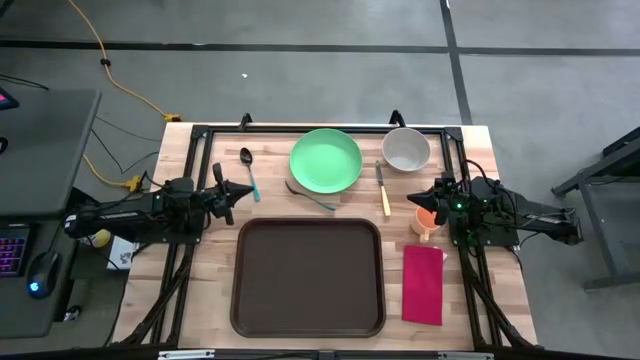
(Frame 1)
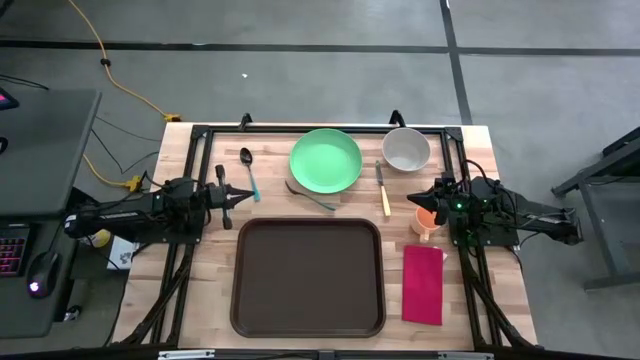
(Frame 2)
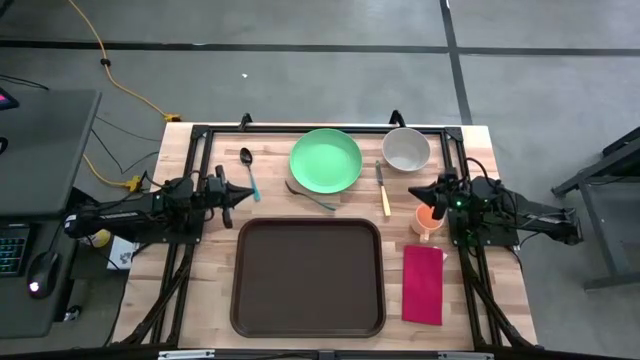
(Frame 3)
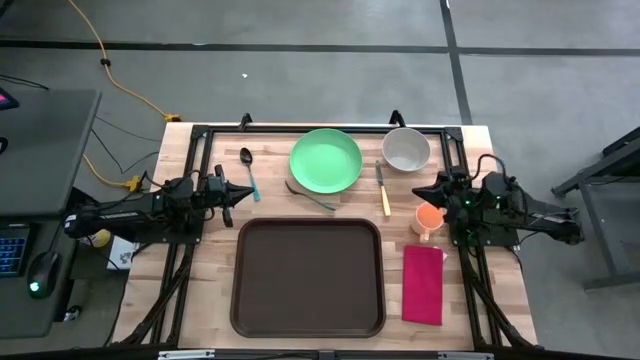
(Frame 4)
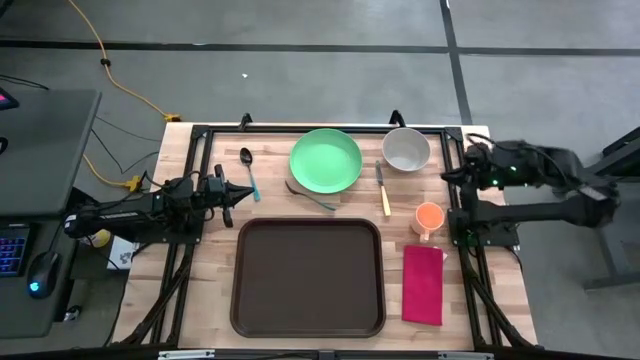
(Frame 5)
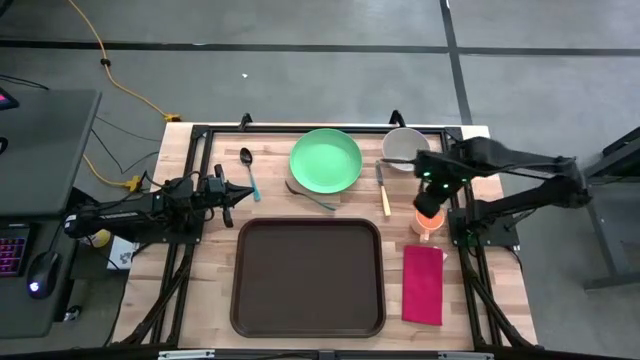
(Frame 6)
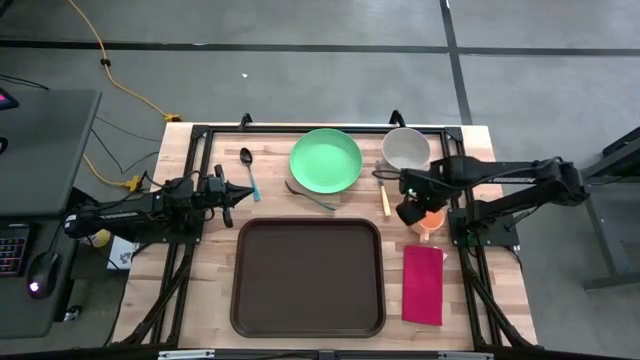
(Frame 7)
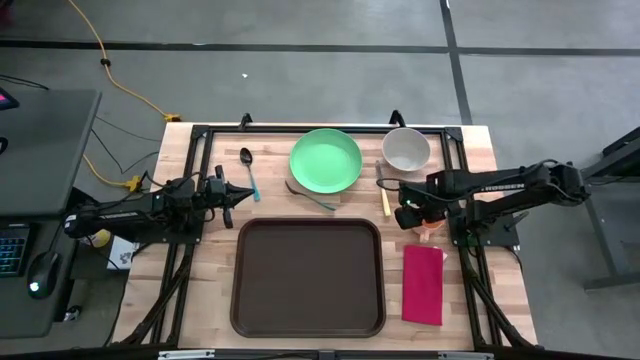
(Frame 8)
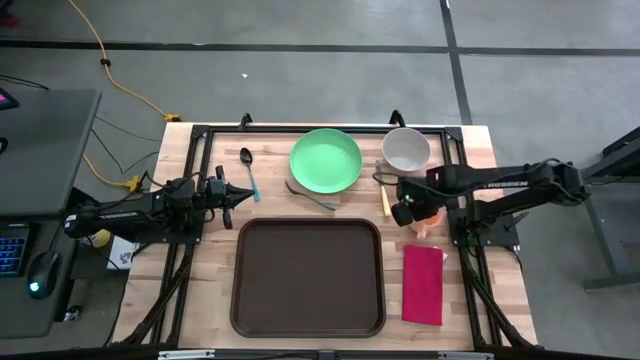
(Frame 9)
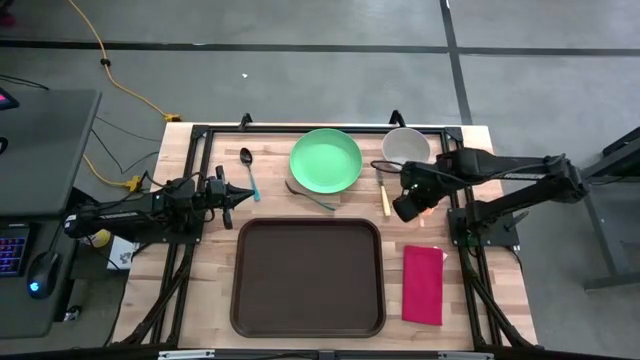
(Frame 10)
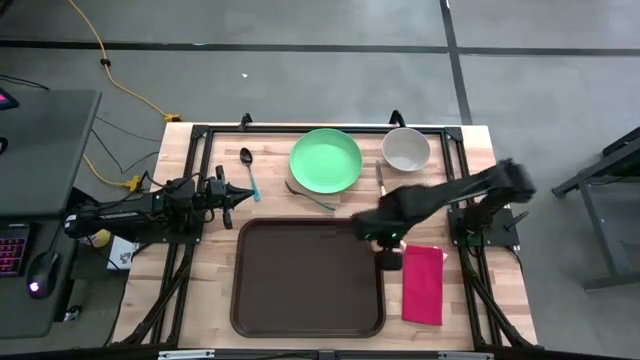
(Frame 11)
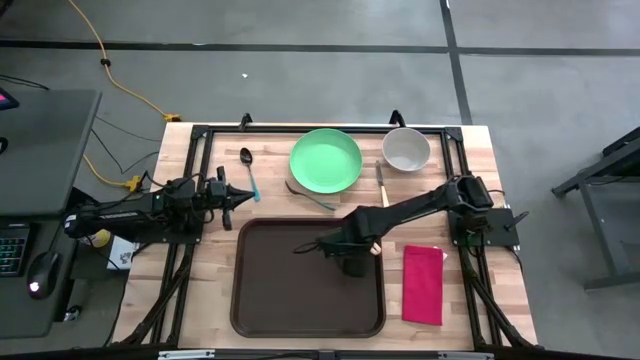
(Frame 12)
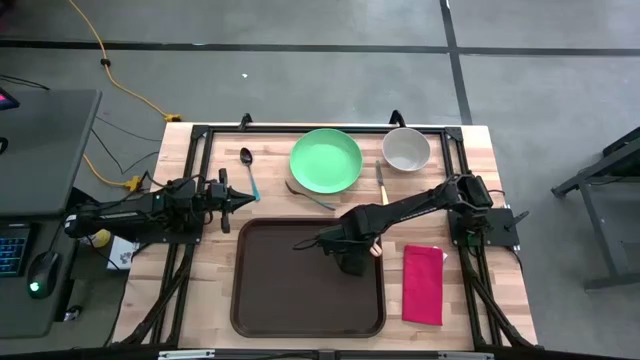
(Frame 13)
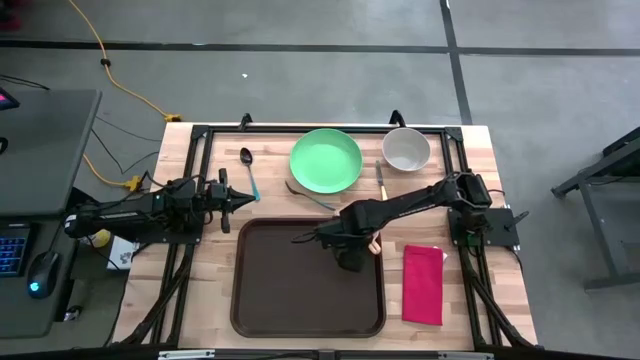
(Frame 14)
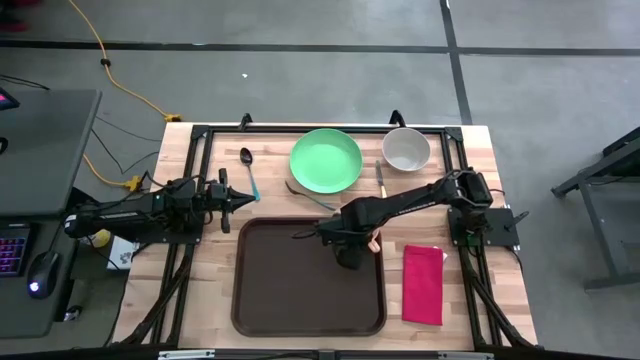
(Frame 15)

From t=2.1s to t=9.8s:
Task: Set up tray
Put the light orange mug on the black serving tray

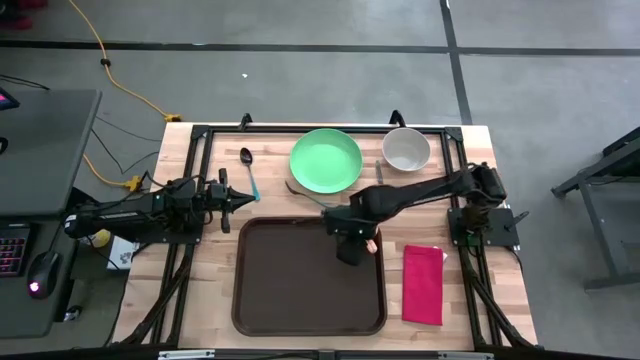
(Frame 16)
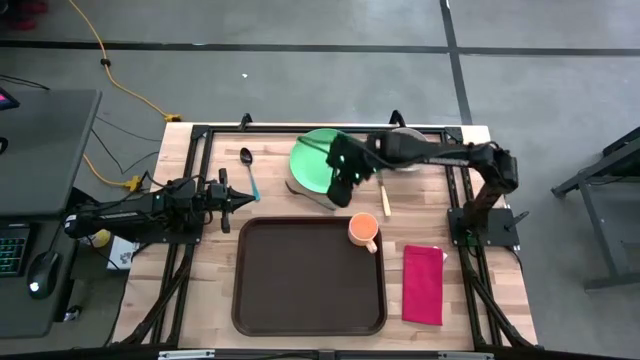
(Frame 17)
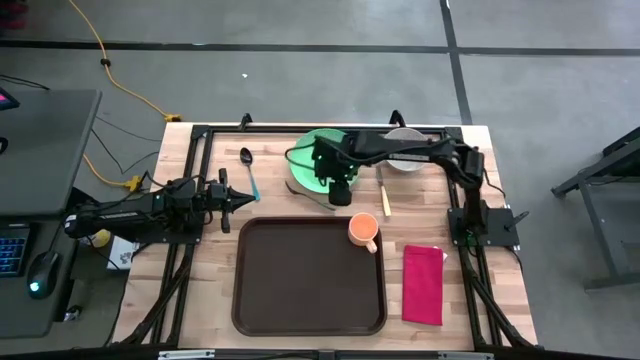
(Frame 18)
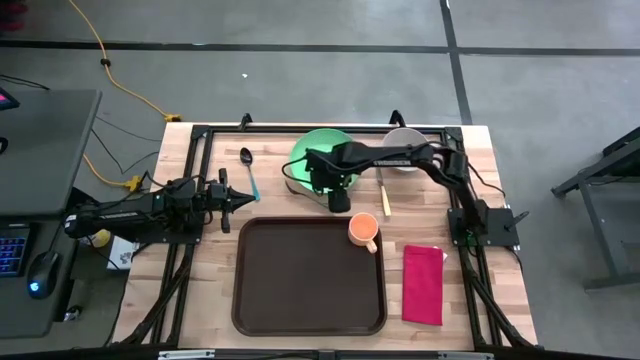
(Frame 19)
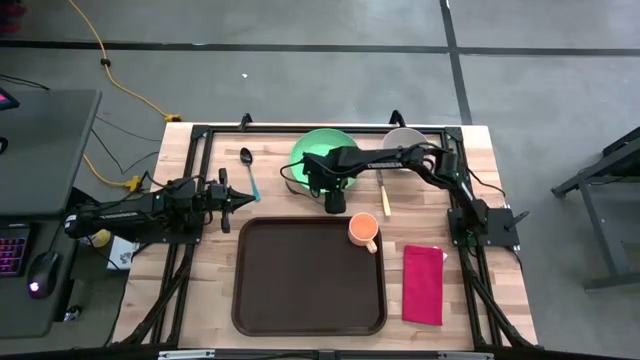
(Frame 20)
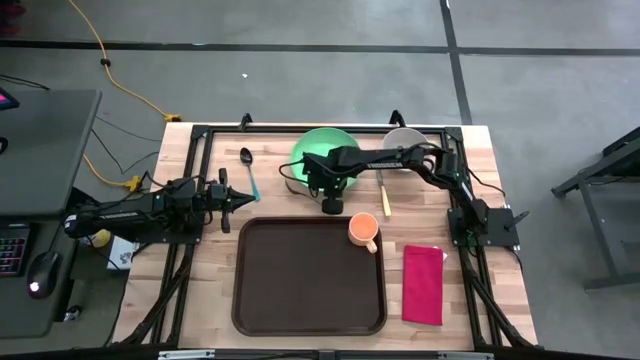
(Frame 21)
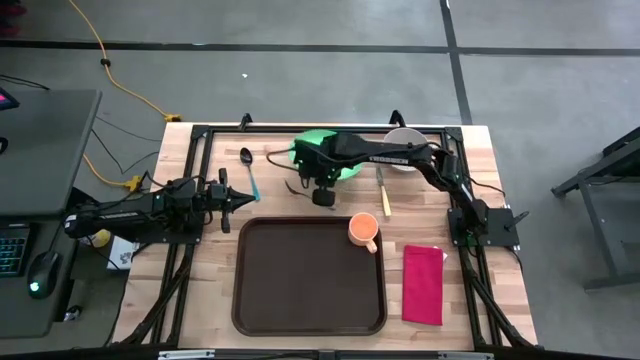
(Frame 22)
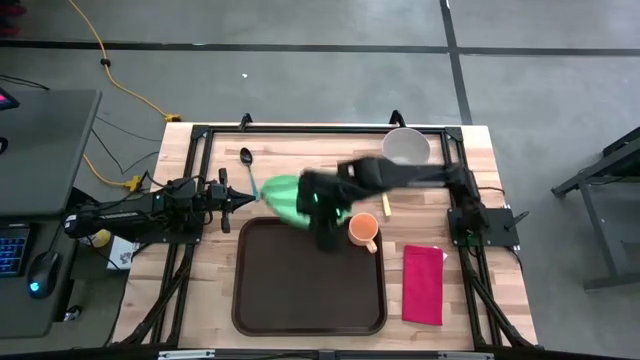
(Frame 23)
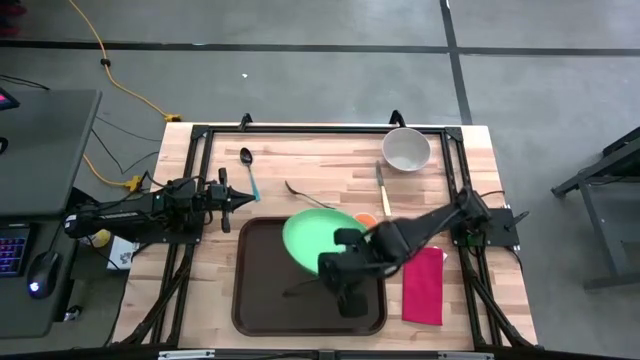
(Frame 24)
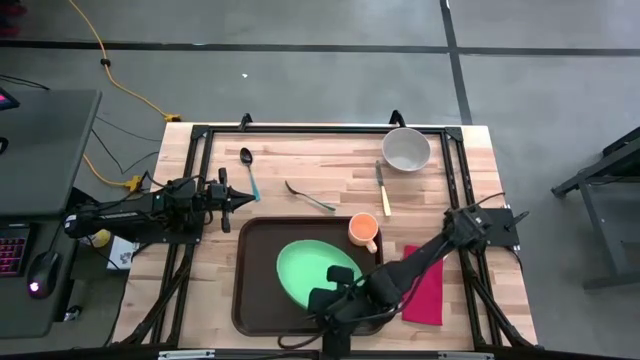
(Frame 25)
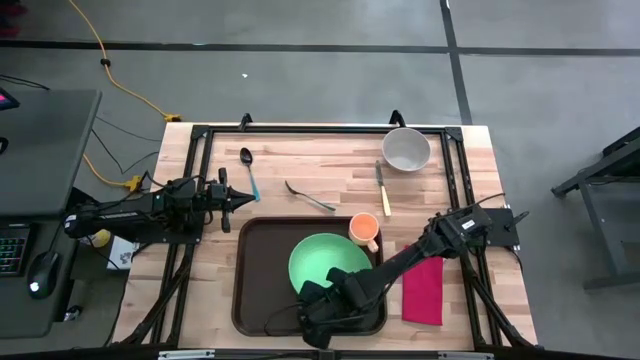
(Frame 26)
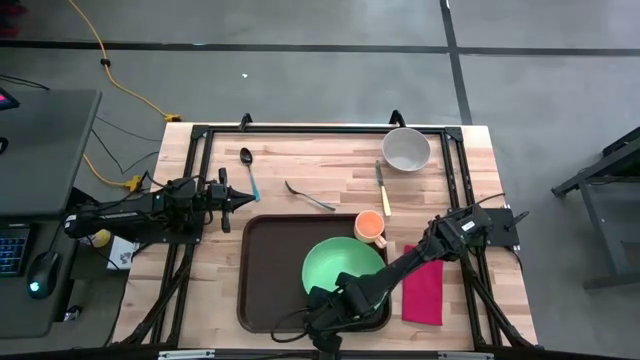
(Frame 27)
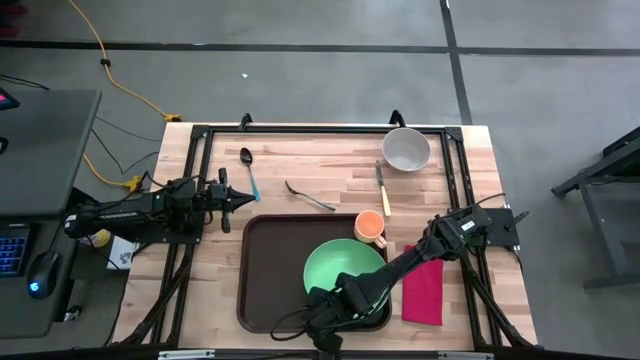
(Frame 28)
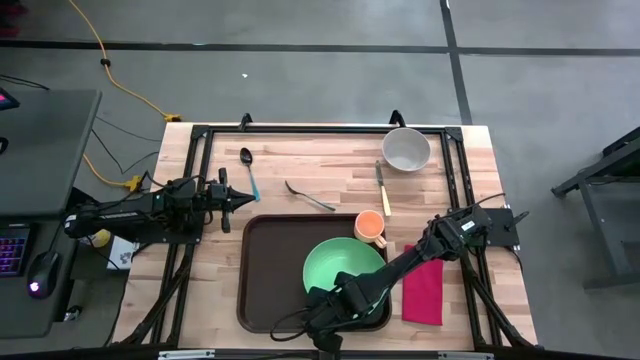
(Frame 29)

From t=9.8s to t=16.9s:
Put the green plate on the black serving tray

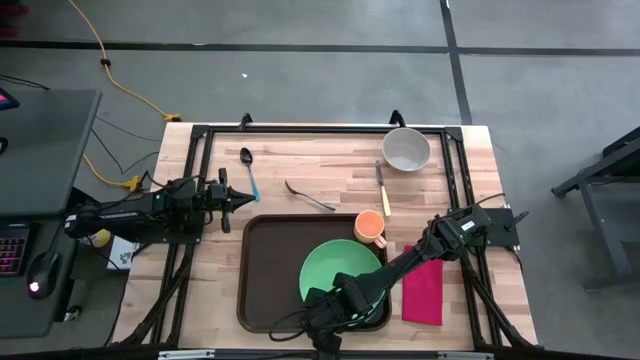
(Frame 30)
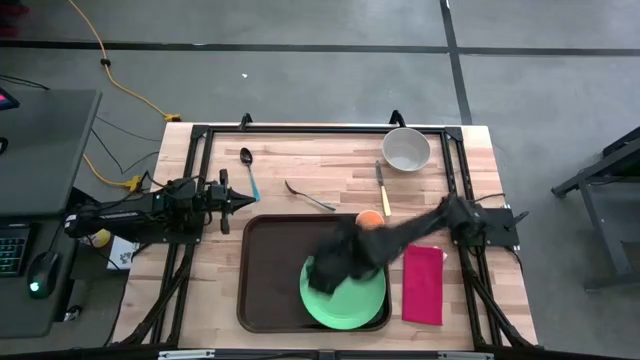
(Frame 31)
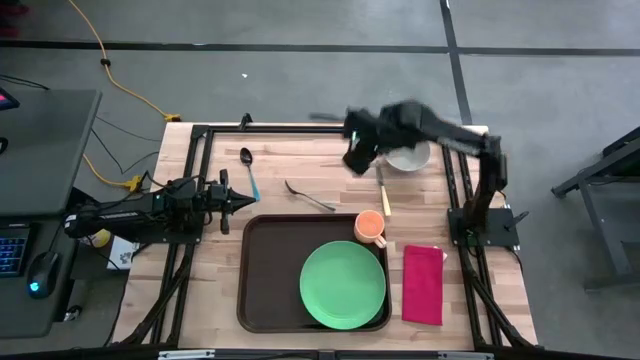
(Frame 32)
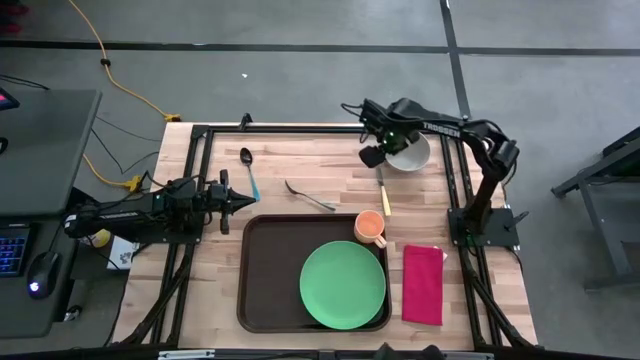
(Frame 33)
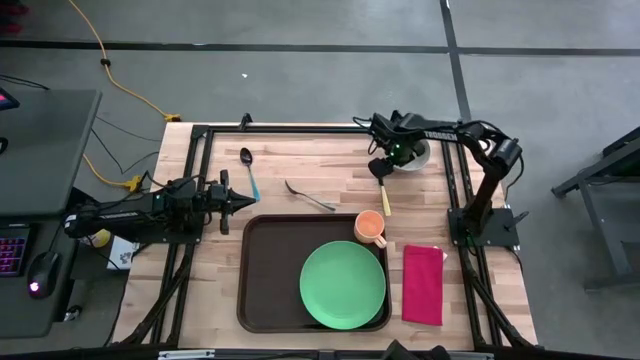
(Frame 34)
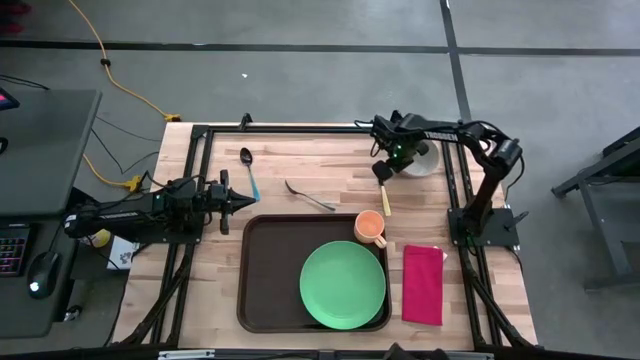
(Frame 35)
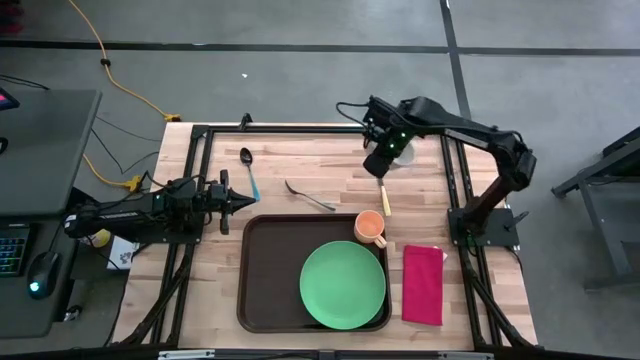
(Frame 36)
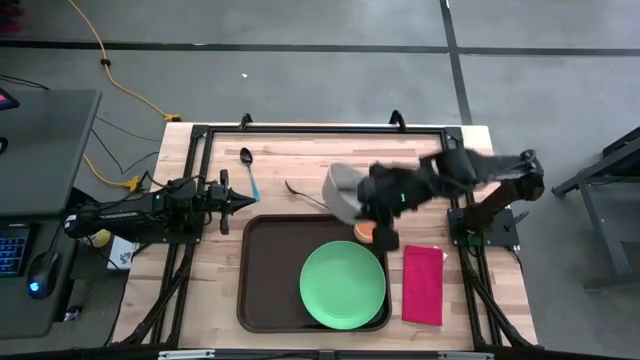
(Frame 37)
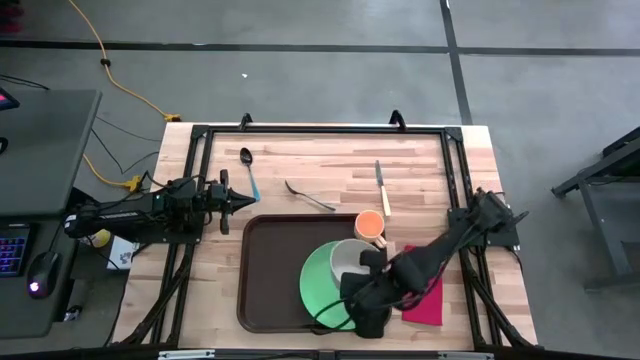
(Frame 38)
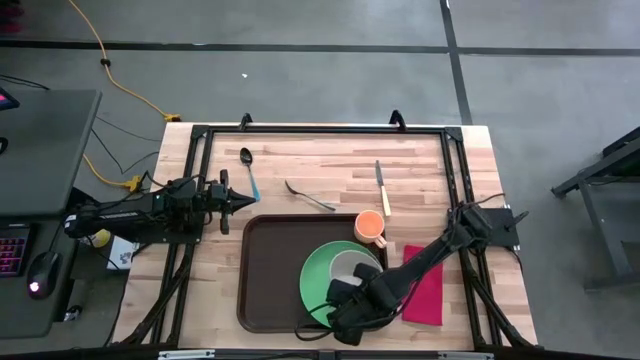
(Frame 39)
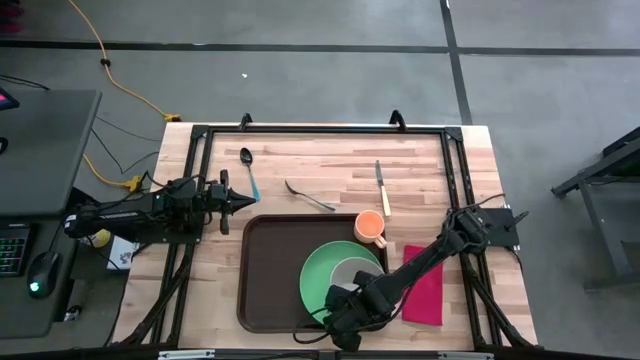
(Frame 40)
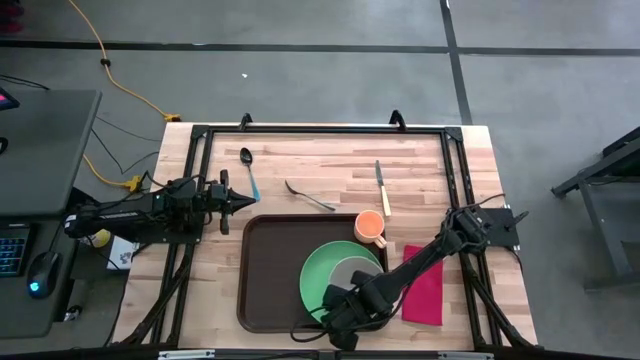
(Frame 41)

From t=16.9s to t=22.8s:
Put the gray bowl on top of the green plate on the black serving tray
